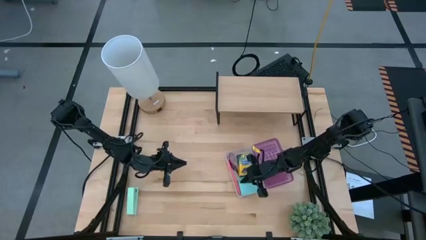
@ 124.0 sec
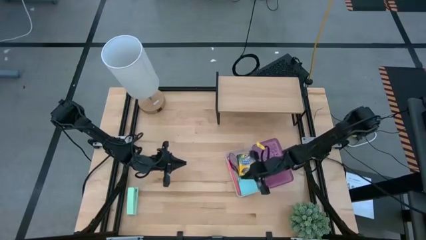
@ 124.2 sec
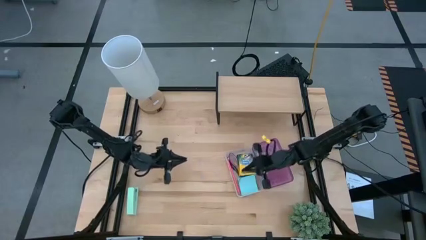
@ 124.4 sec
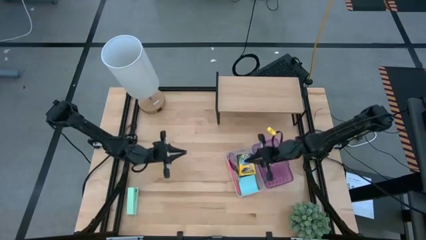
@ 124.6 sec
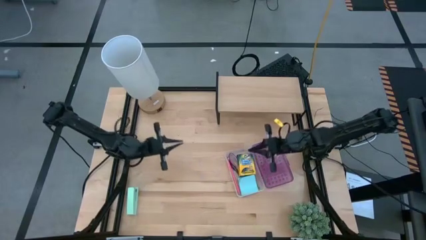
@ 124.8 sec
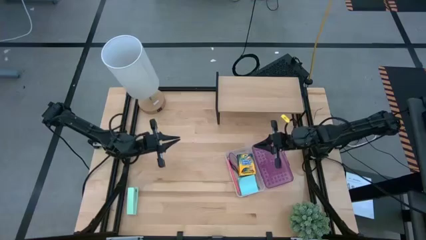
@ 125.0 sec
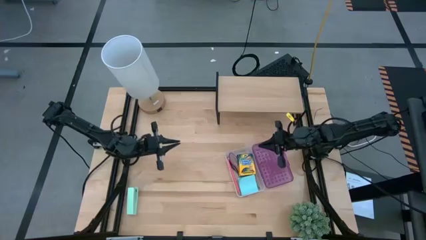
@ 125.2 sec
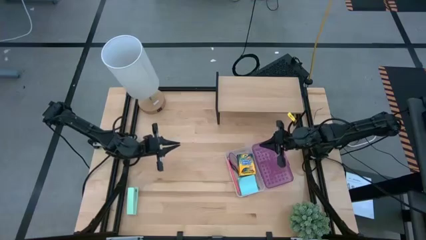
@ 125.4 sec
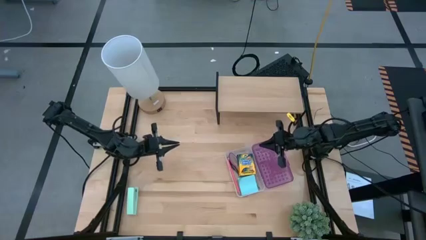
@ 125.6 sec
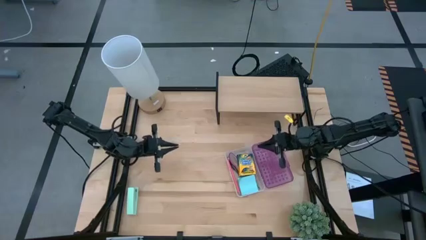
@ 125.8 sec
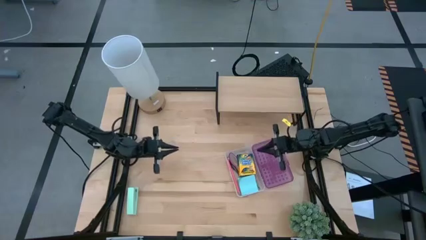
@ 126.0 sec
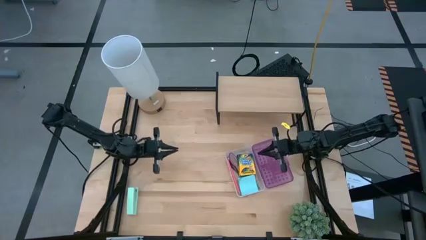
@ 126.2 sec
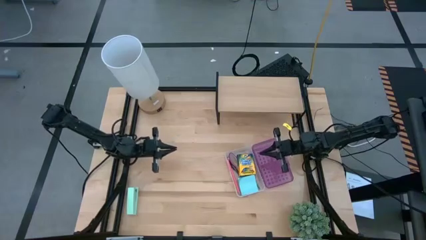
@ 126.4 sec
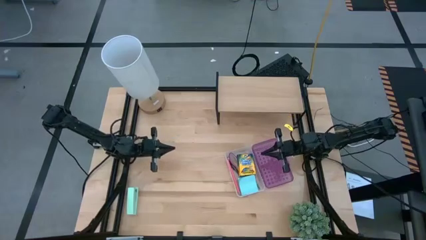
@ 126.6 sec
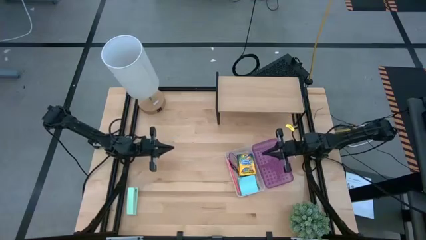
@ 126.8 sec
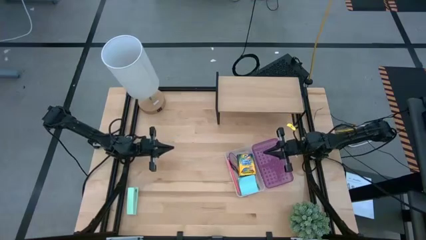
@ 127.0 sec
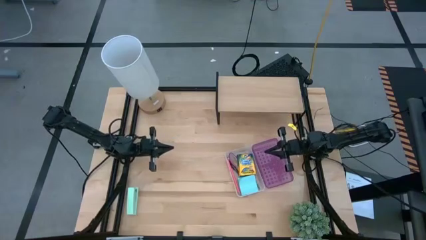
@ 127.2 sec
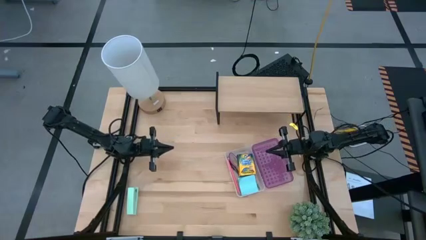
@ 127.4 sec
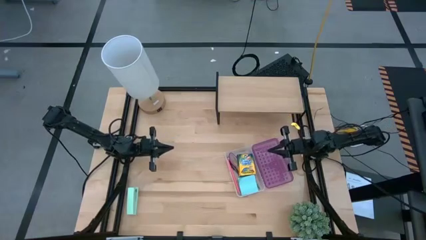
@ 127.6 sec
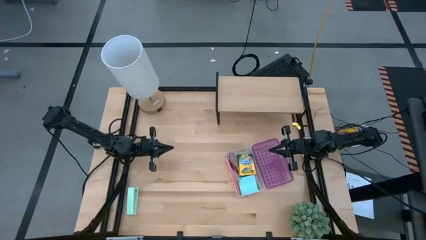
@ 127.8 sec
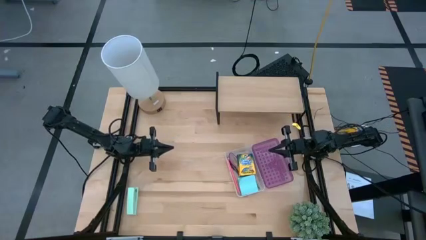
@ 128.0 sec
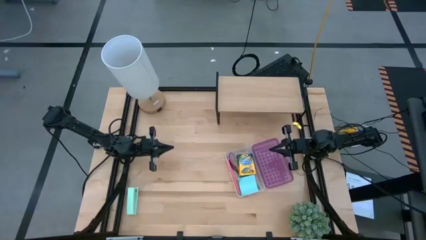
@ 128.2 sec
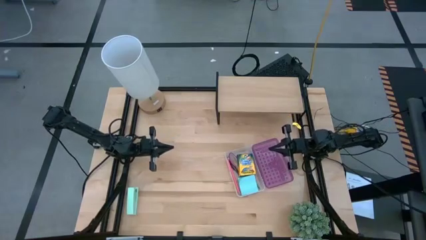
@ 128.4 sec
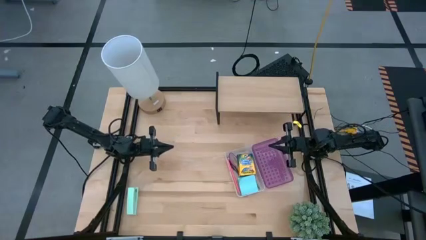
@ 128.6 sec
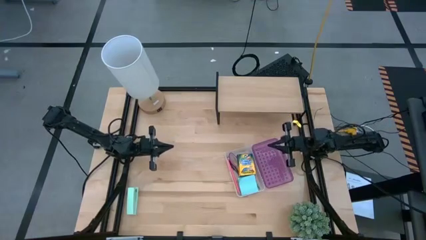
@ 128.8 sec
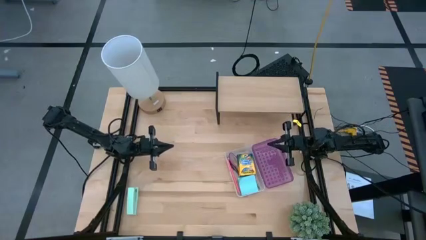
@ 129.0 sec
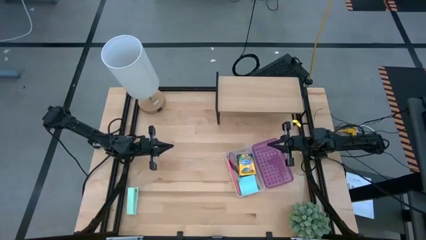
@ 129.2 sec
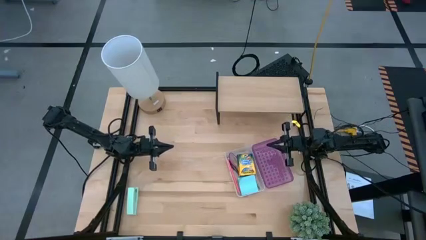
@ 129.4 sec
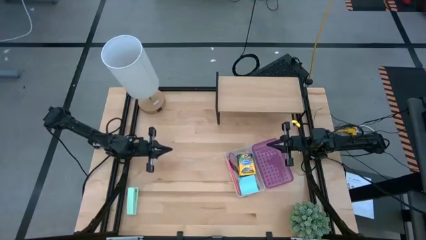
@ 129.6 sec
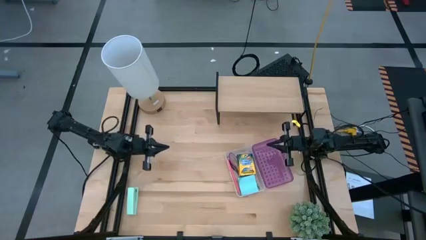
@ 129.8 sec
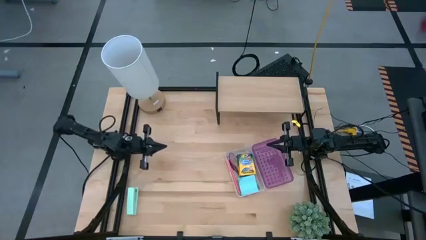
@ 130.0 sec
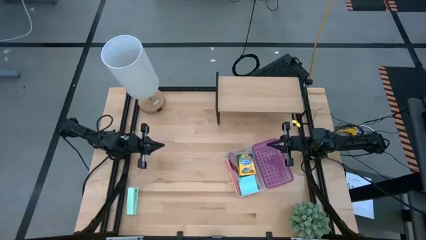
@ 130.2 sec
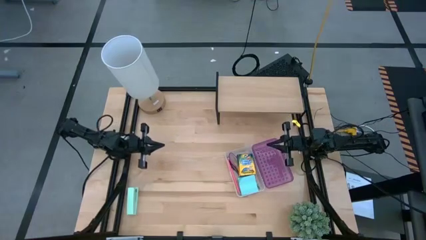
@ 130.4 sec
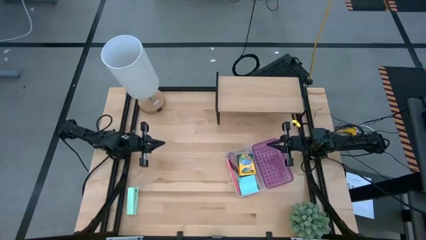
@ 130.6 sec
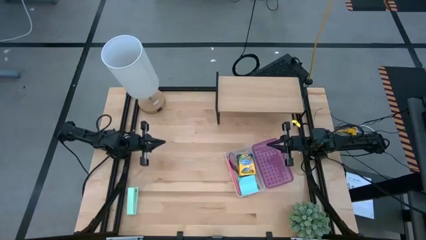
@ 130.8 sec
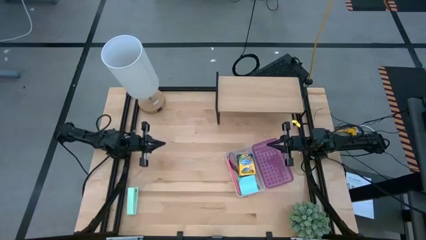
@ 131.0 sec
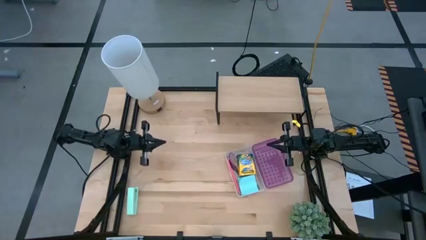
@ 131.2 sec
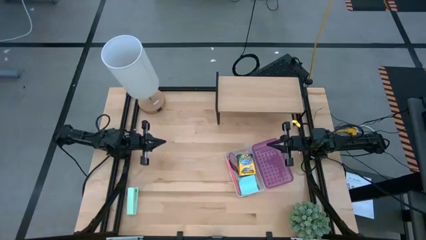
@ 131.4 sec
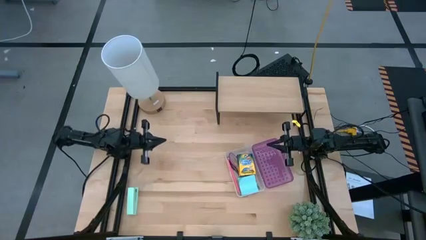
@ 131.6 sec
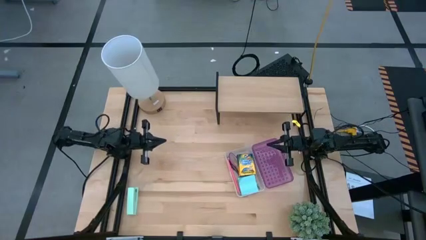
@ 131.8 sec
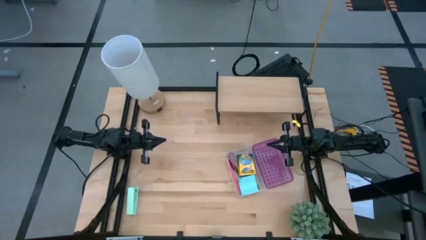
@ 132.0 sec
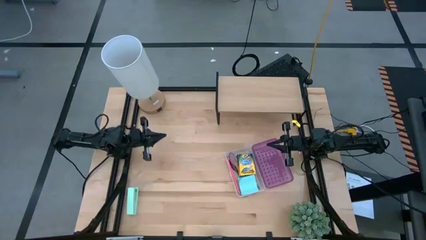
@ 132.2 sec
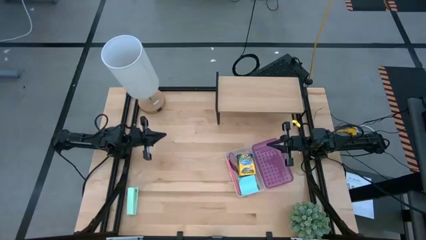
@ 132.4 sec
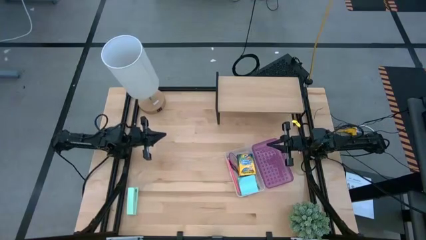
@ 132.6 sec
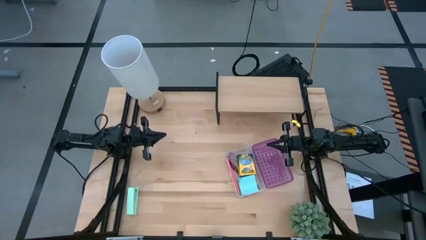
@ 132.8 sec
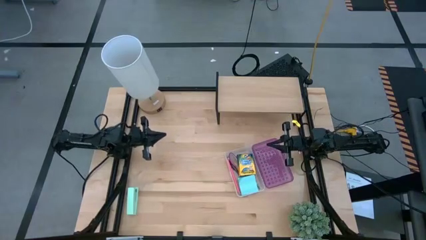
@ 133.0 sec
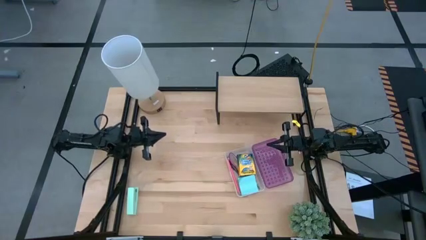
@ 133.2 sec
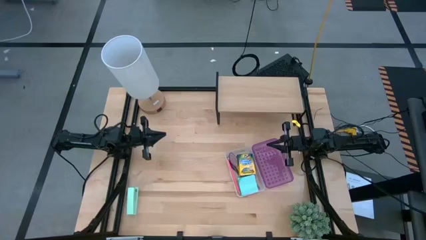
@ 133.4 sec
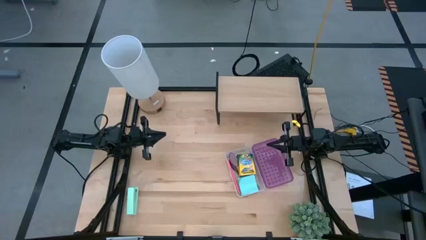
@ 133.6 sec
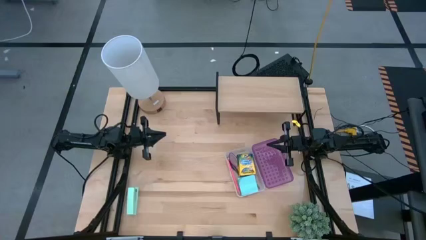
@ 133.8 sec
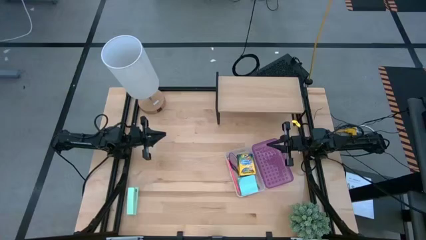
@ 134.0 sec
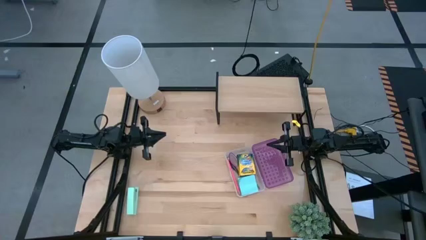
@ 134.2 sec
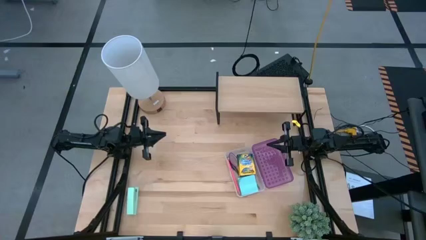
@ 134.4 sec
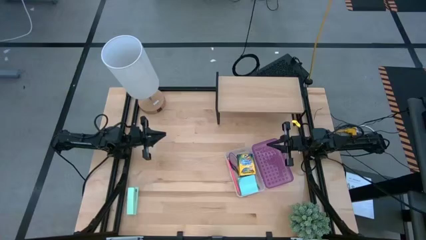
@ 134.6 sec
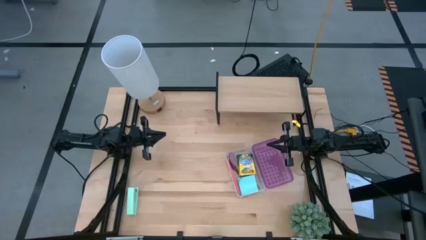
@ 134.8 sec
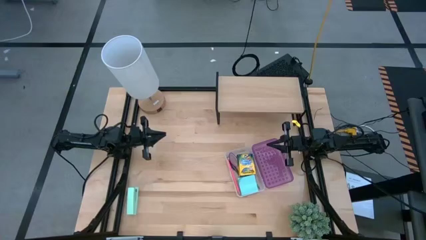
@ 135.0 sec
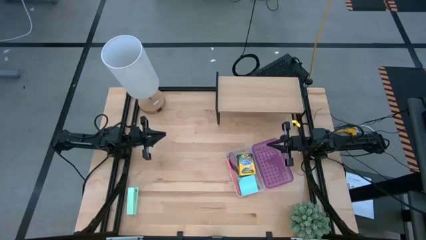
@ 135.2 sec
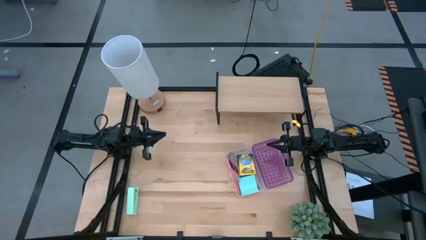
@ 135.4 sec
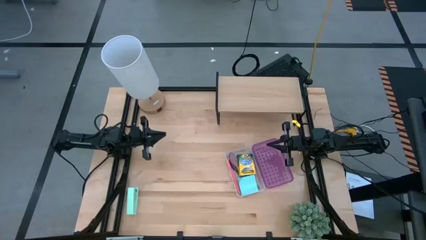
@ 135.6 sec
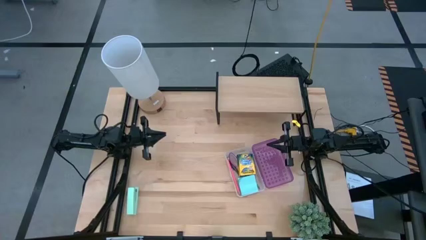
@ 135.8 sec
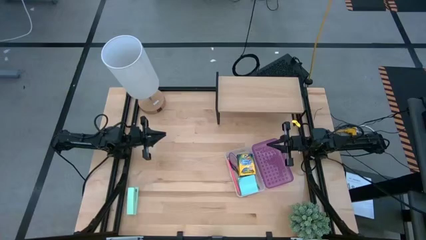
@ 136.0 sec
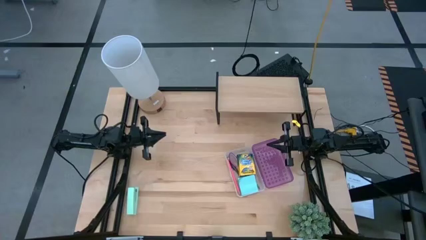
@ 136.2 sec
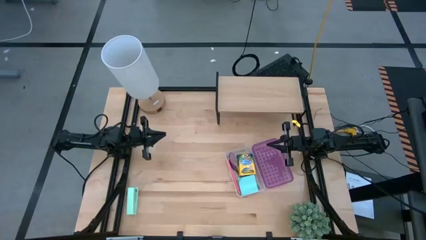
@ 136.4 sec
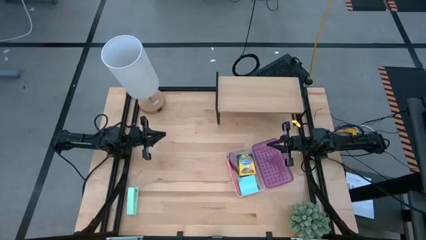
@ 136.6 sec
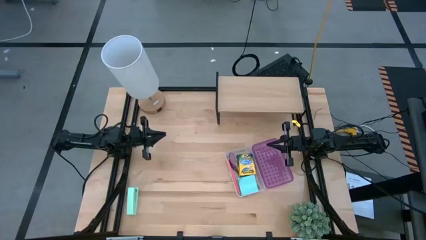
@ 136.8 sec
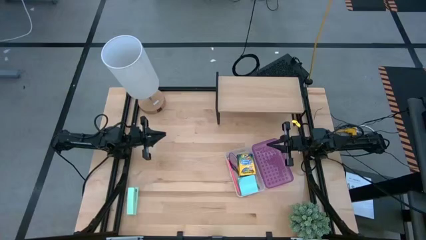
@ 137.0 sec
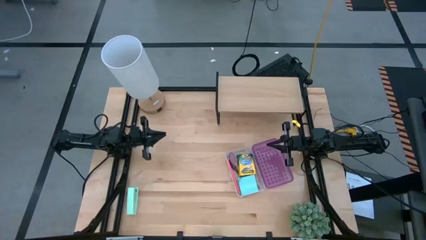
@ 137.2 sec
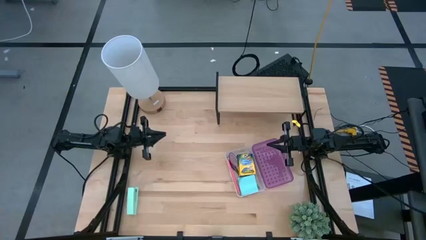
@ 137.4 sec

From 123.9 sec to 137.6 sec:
Task: Pack school essentials
Return to Home Position
